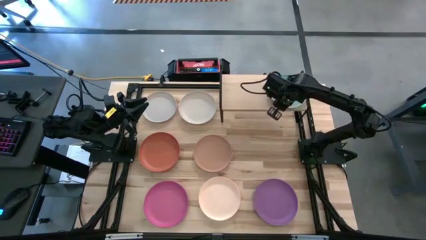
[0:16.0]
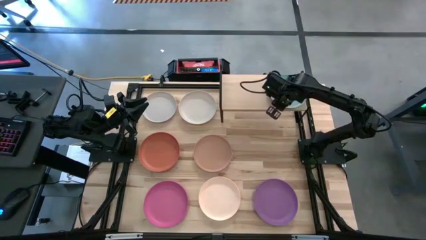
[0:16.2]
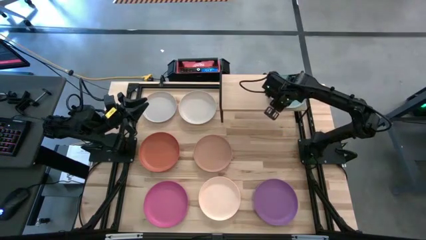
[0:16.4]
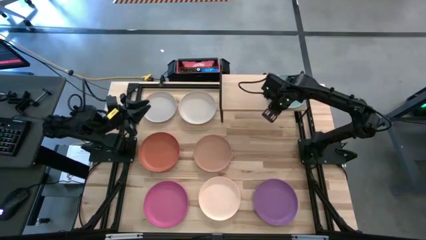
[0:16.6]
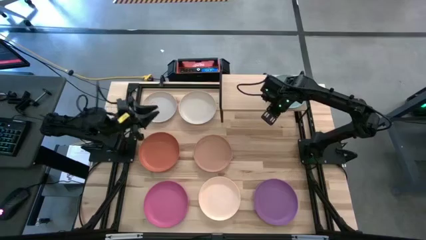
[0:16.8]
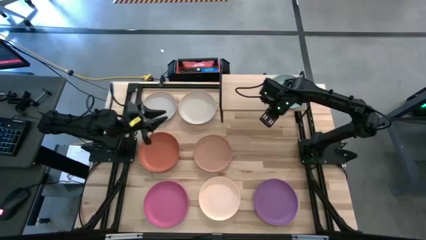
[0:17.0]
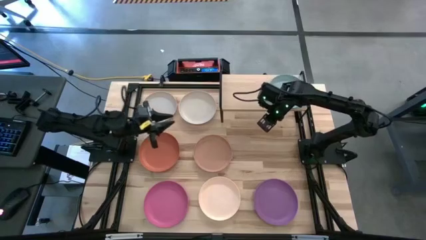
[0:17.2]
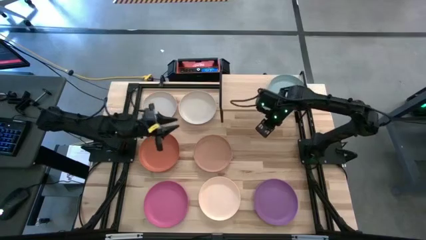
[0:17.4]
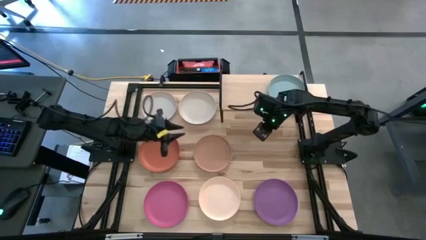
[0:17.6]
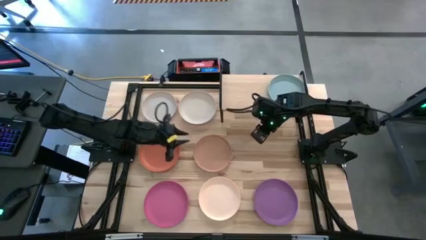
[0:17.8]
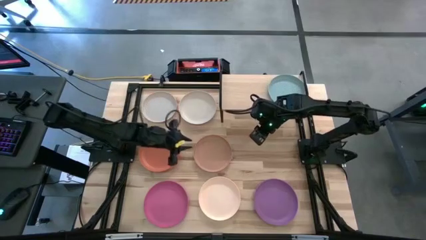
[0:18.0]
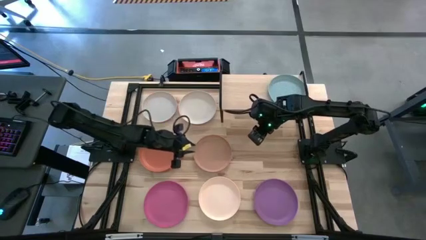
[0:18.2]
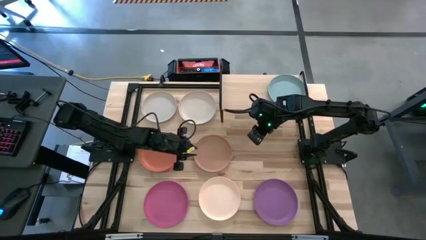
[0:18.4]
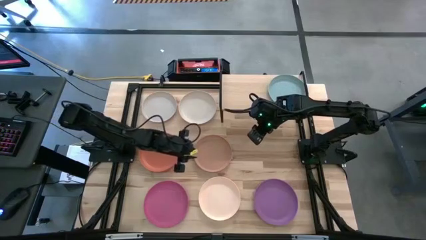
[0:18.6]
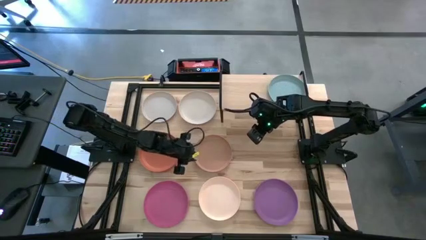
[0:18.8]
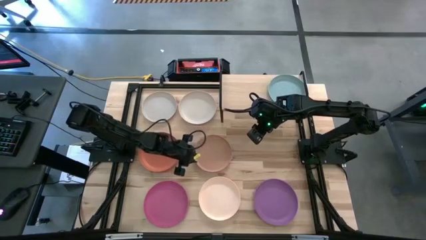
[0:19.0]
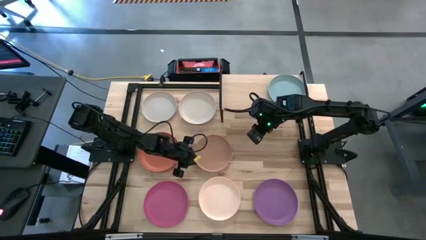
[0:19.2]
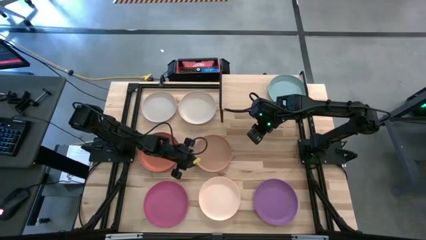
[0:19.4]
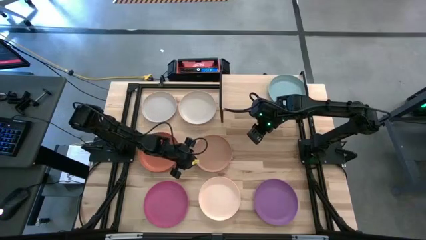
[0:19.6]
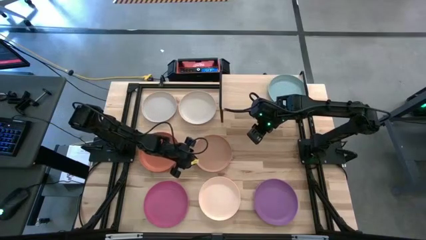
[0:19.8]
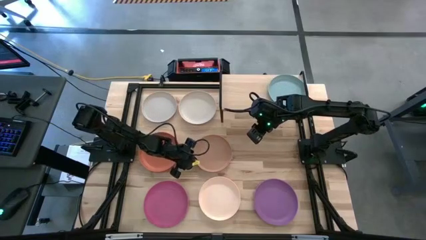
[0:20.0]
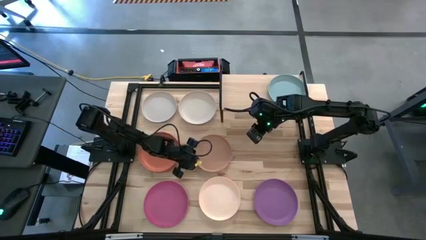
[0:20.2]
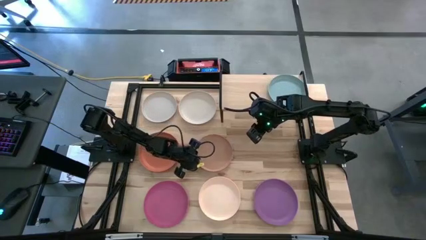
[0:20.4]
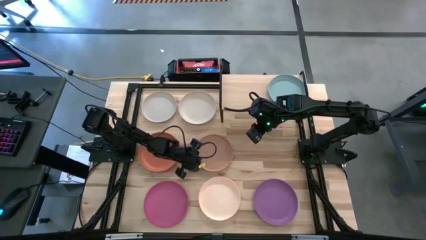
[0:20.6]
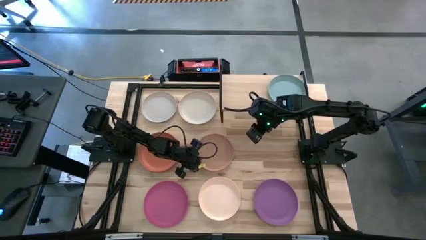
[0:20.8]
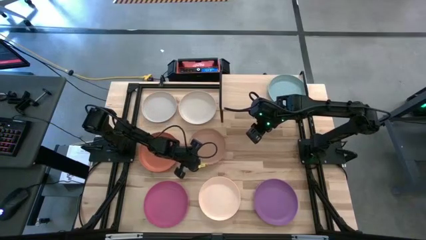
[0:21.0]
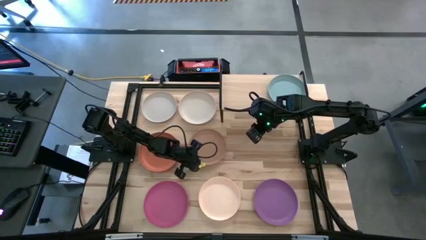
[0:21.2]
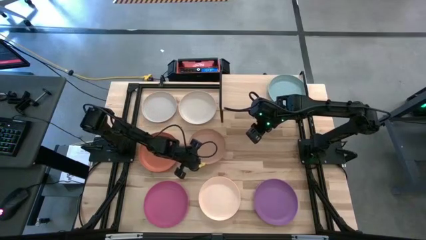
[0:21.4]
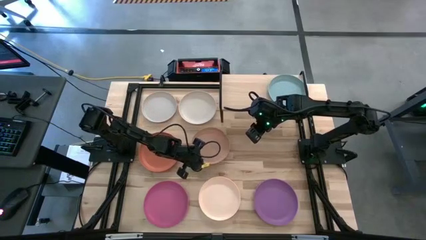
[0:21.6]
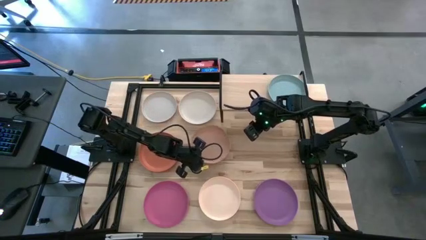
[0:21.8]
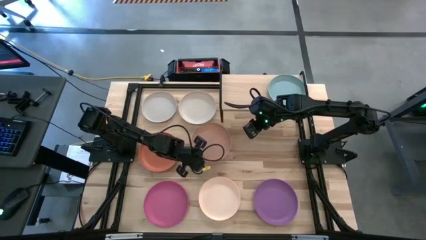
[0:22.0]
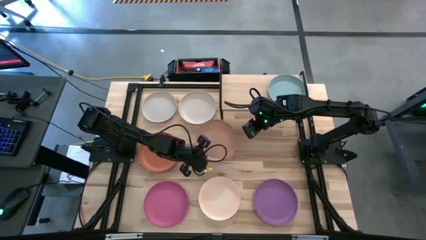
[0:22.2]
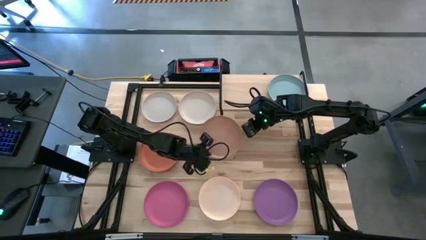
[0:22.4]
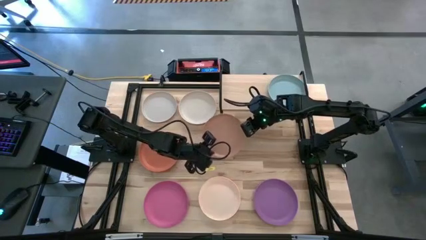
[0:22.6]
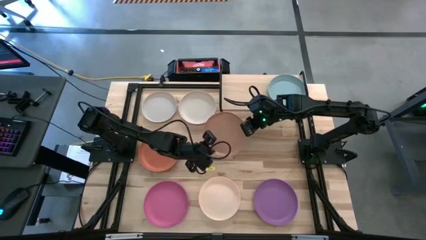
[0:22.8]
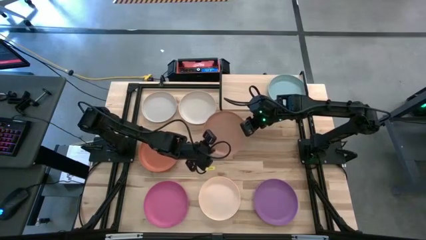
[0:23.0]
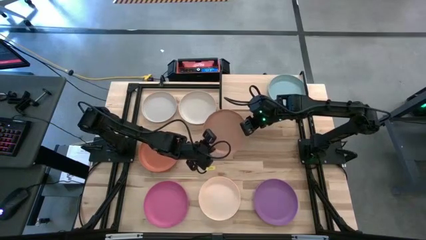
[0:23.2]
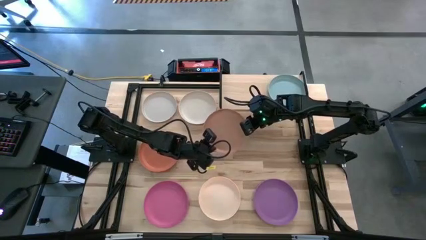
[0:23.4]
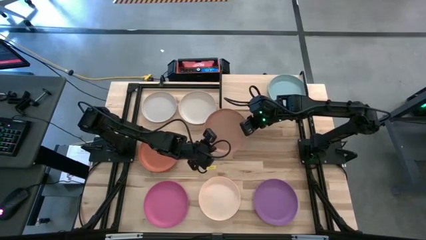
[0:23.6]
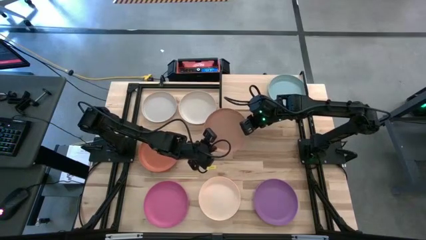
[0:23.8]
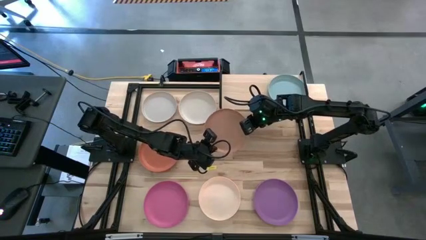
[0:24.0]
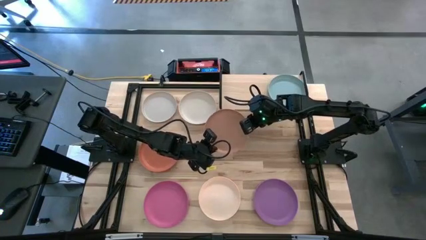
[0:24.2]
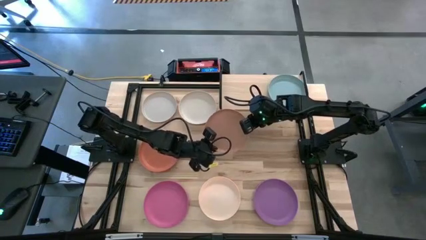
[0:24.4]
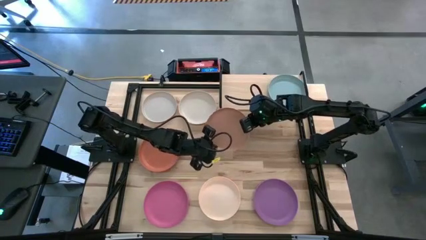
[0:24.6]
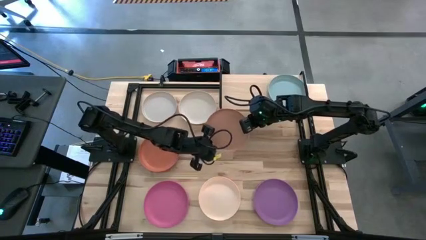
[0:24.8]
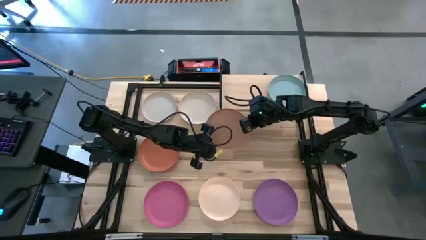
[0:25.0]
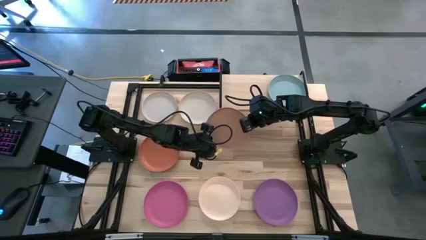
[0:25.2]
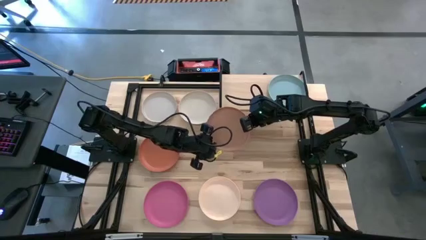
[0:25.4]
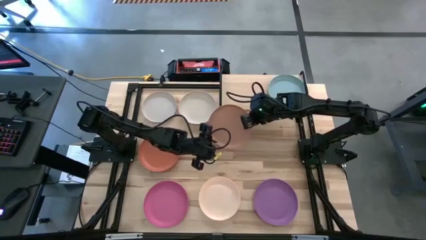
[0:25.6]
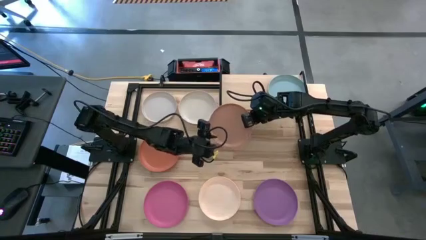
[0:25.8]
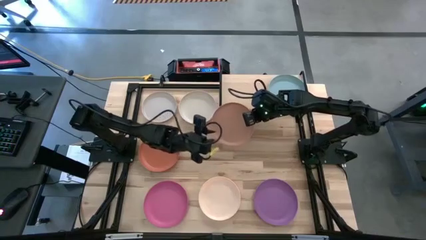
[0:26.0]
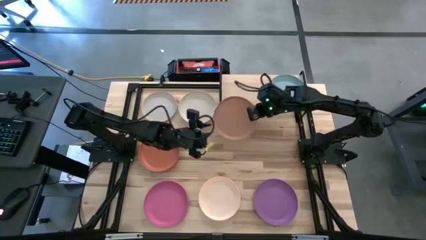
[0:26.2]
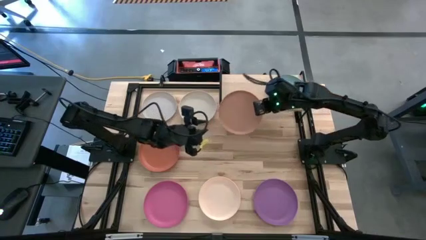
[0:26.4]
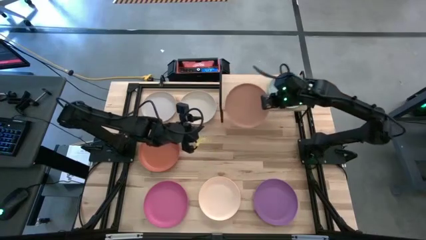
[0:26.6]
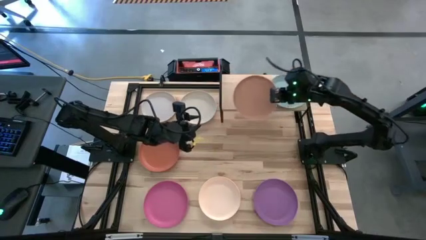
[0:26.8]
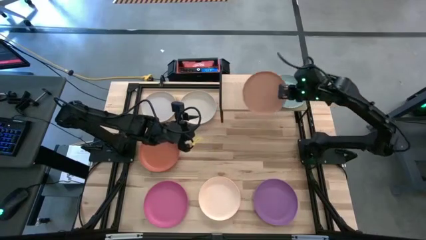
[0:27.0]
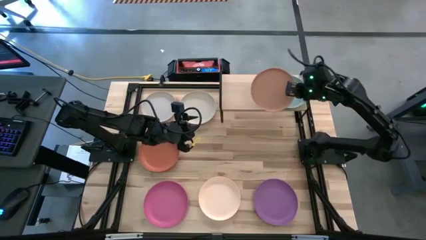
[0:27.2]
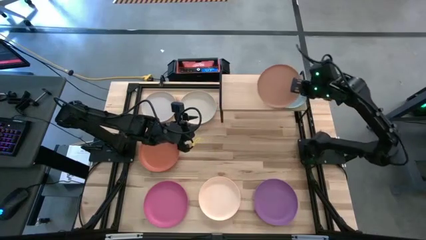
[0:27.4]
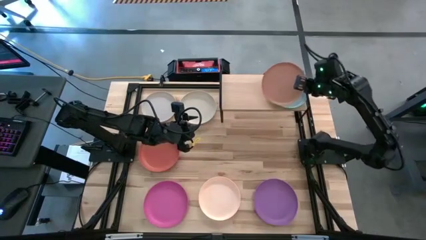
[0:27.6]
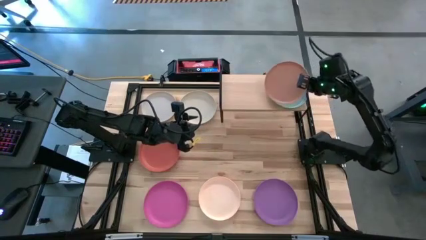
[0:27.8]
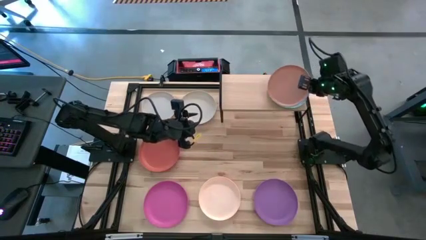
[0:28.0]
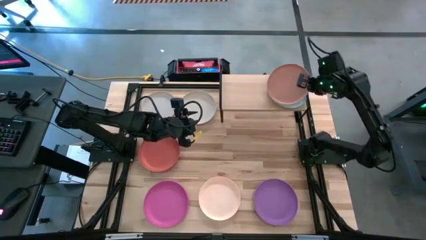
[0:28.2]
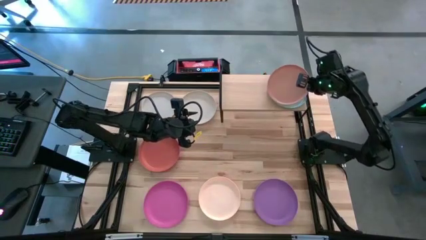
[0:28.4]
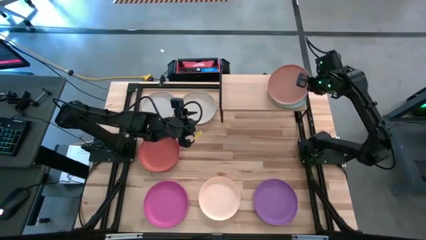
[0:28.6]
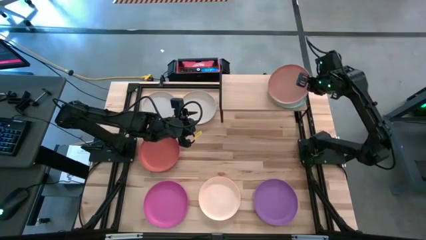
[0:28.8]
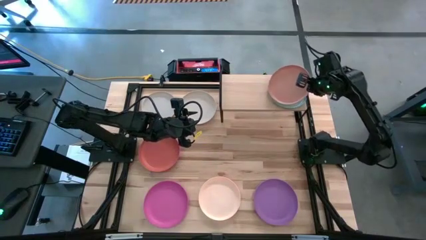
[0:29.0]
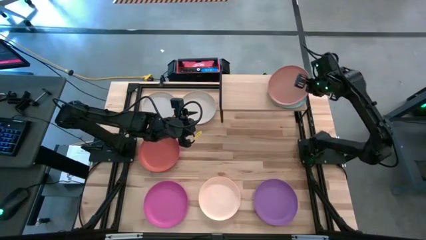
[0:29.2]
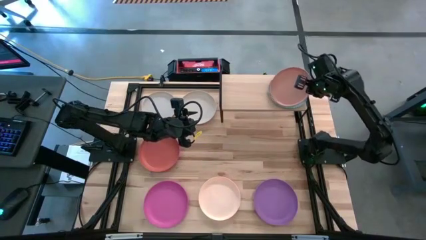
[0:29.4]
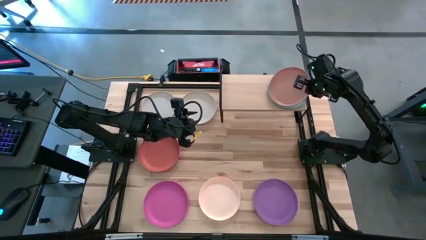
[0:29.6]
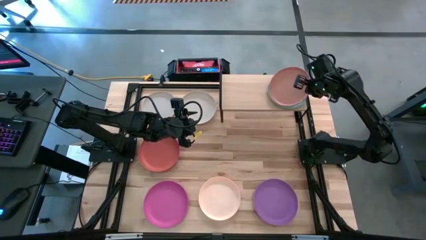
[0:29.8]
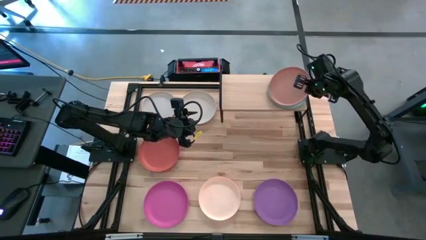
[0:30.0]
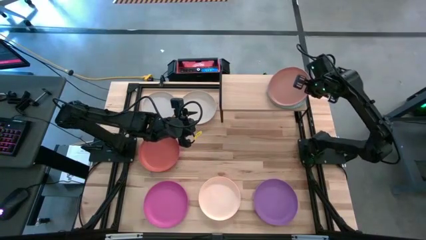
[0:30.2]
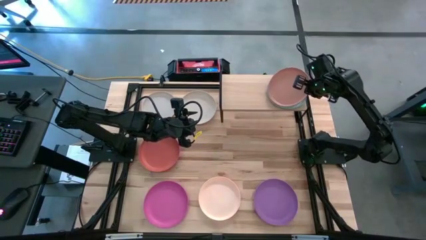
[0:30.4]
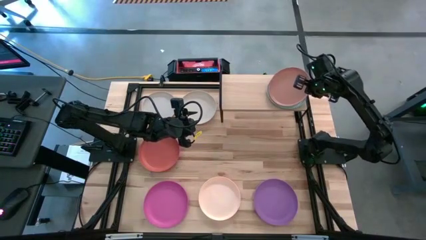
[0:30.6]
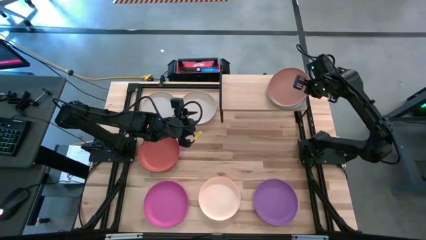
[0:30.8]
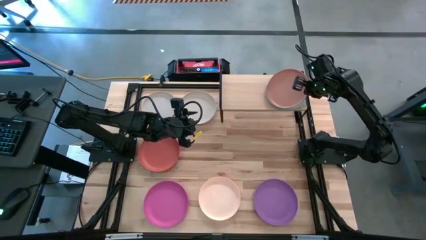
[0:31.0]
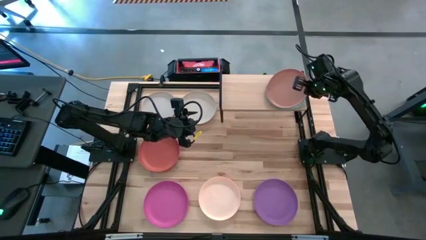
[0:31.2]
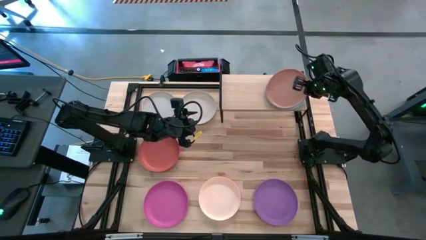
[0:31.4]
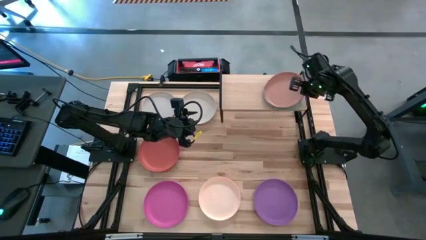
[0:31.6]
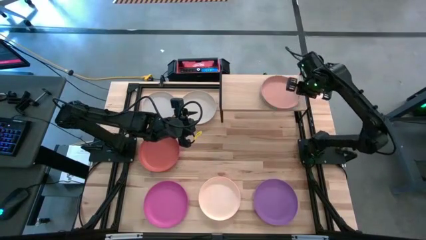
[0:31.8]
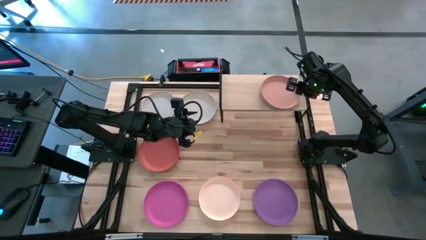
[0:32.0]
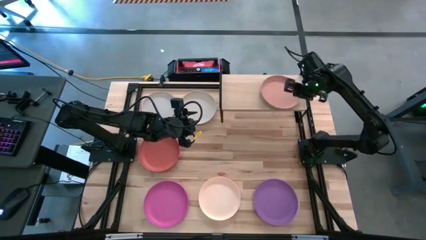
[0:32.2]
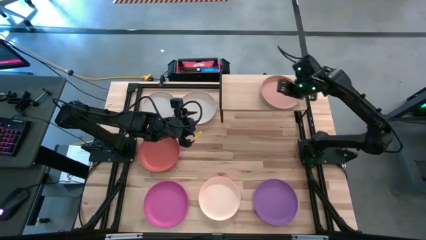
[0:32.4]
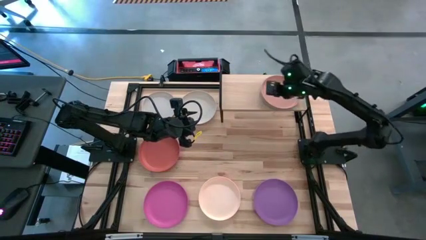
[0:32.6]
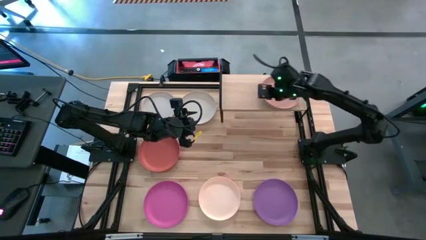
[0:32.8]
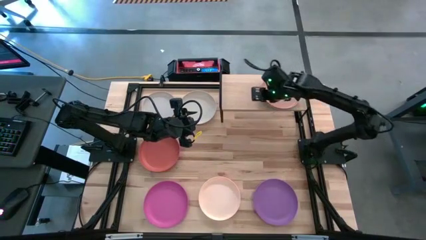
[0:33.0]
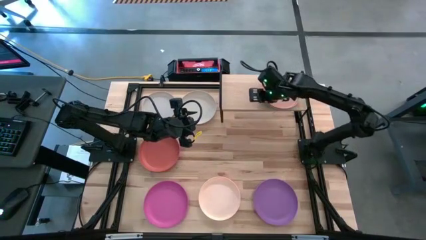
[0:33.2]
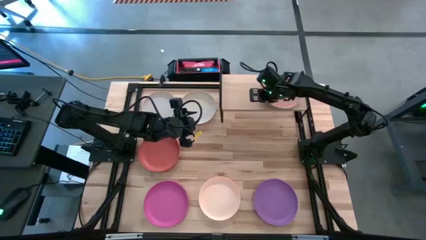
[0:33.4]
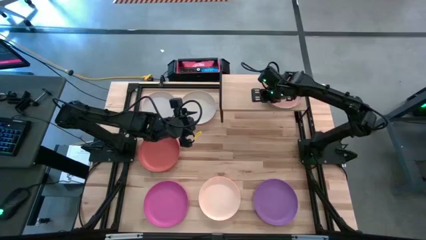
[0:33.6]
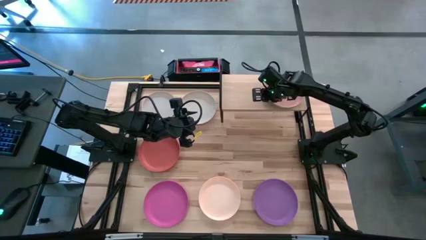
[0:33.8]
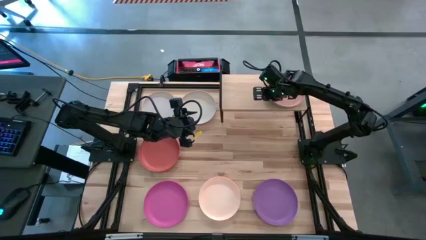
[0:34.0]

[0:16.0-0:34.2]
Task: Place and stack plates onto a shelf
Stack the brown plate on top of the blue plate on the shelf
